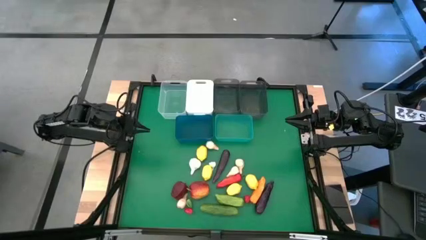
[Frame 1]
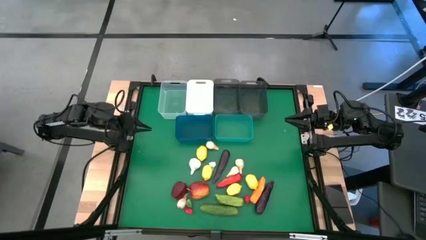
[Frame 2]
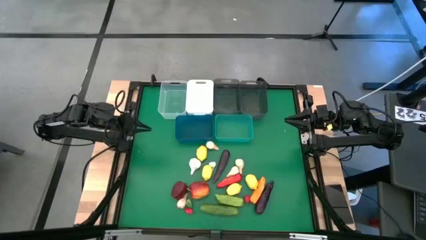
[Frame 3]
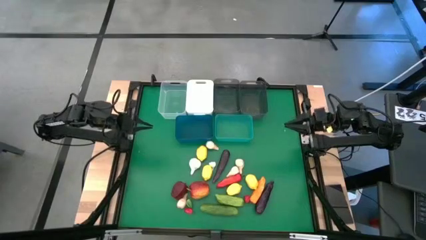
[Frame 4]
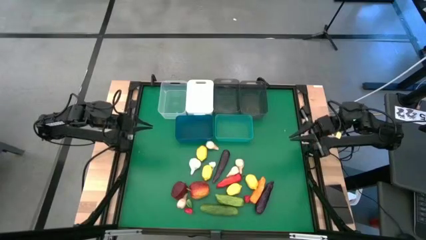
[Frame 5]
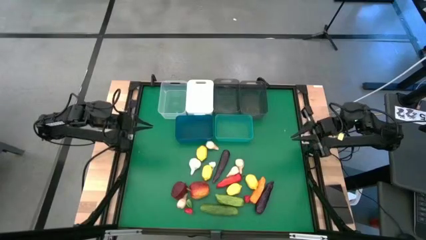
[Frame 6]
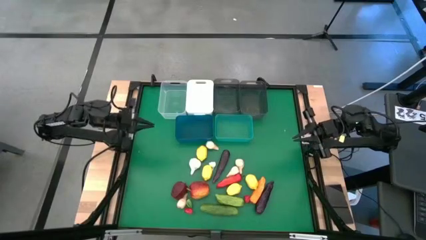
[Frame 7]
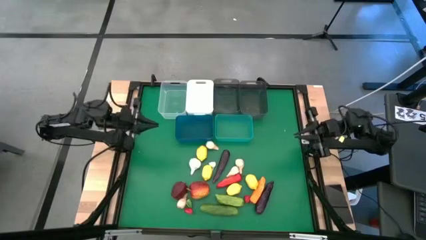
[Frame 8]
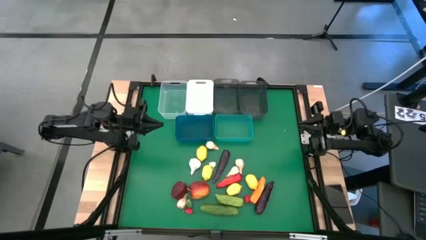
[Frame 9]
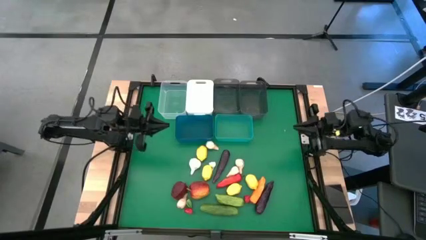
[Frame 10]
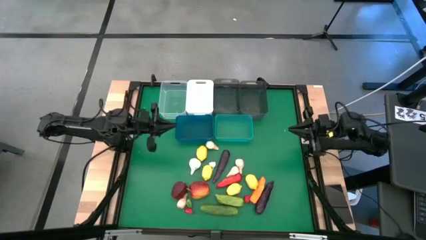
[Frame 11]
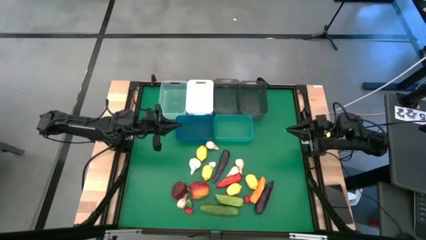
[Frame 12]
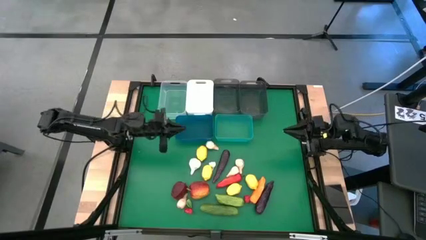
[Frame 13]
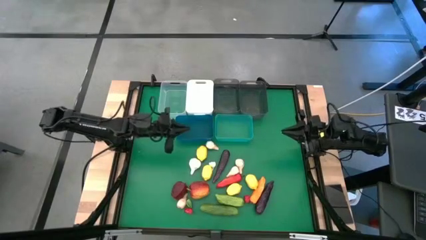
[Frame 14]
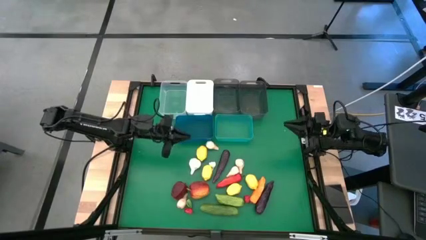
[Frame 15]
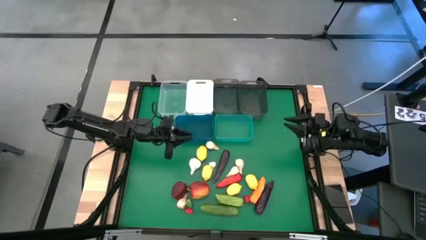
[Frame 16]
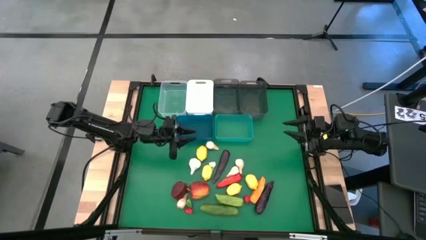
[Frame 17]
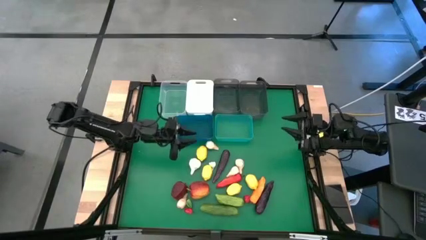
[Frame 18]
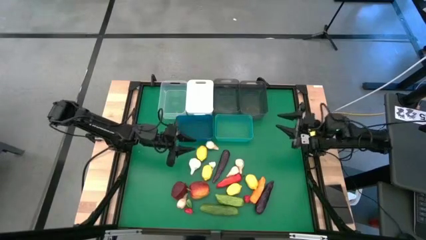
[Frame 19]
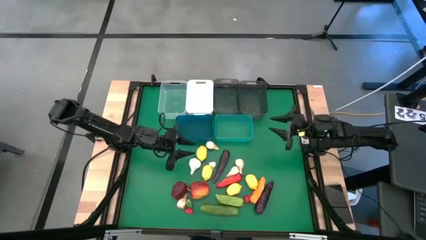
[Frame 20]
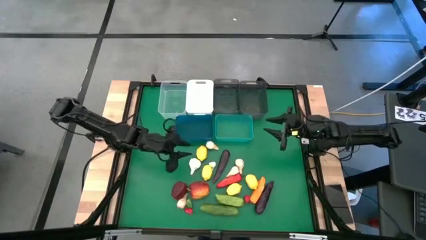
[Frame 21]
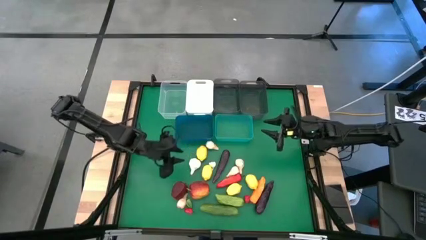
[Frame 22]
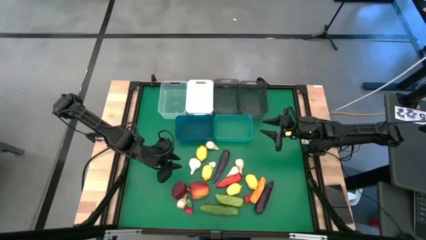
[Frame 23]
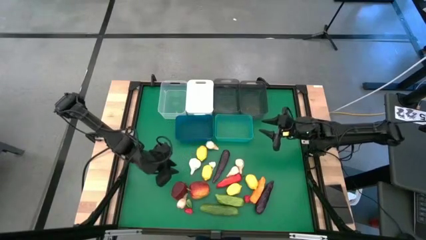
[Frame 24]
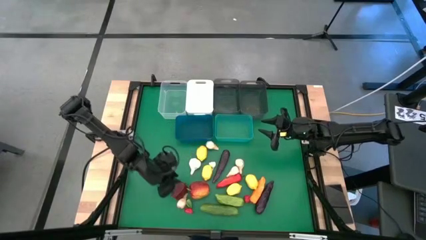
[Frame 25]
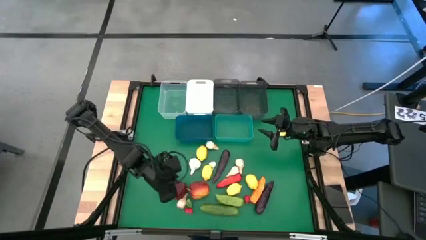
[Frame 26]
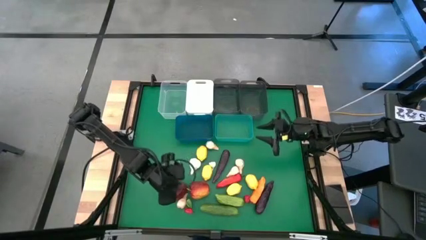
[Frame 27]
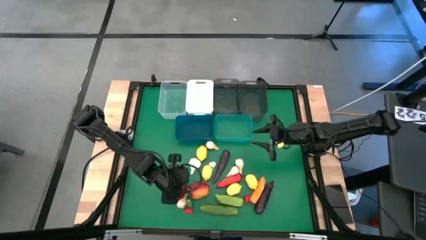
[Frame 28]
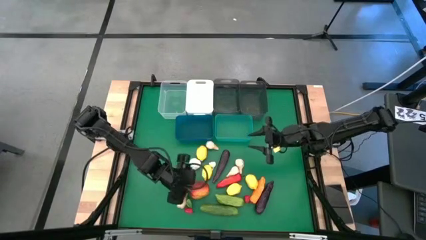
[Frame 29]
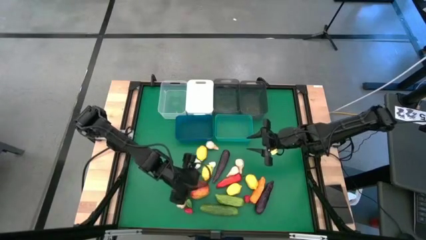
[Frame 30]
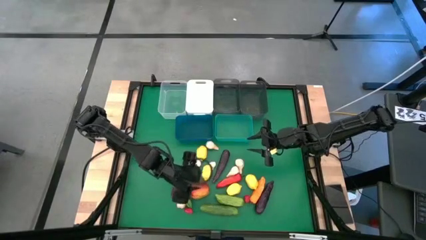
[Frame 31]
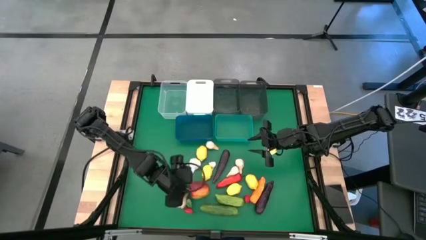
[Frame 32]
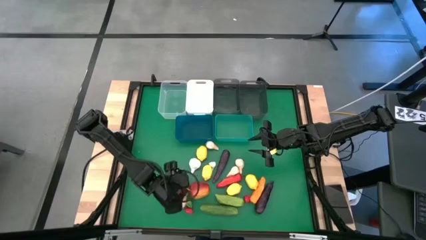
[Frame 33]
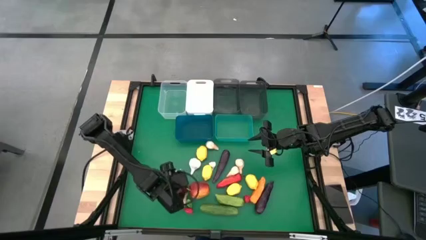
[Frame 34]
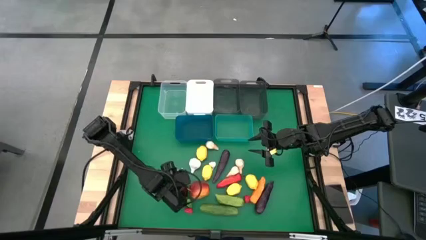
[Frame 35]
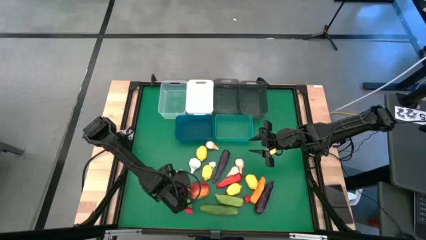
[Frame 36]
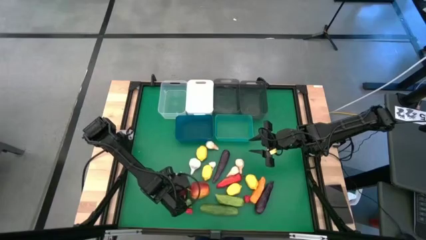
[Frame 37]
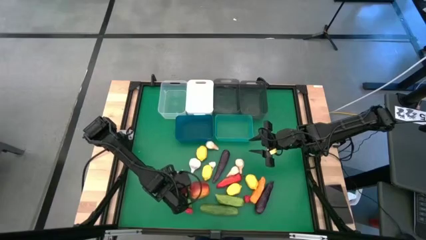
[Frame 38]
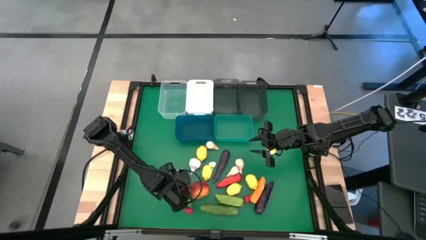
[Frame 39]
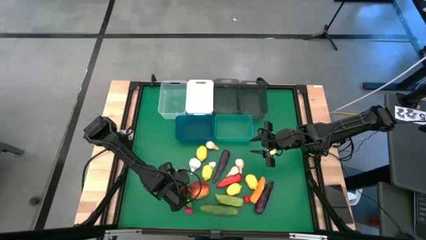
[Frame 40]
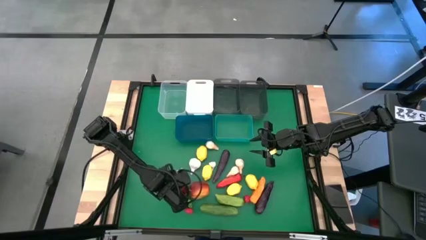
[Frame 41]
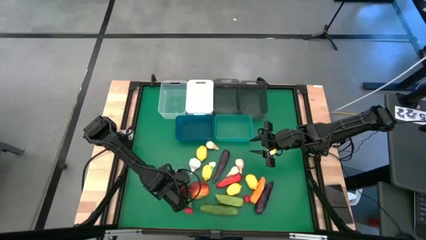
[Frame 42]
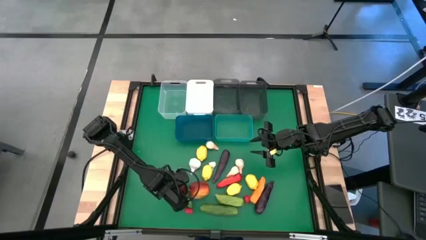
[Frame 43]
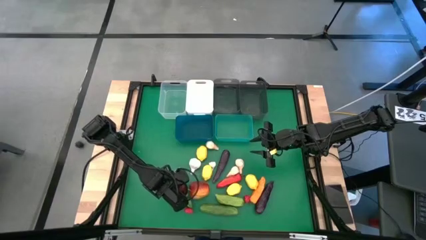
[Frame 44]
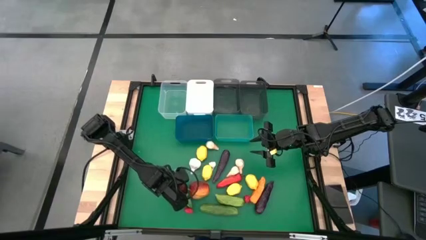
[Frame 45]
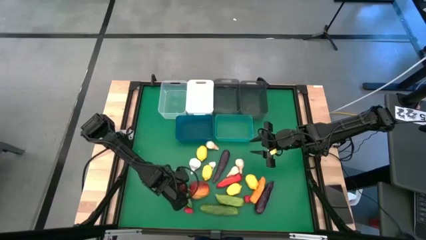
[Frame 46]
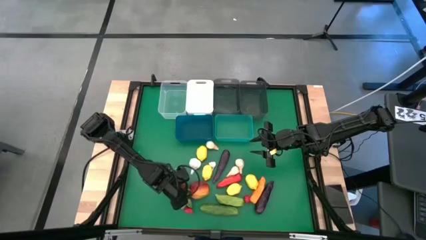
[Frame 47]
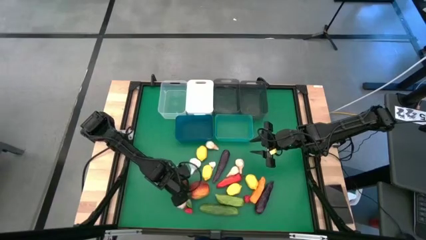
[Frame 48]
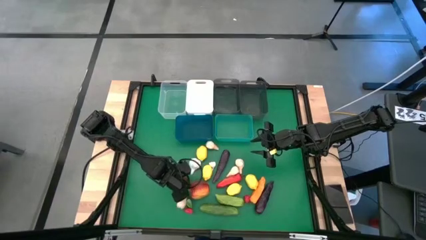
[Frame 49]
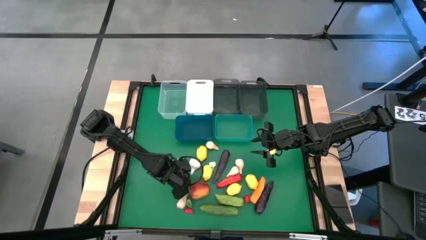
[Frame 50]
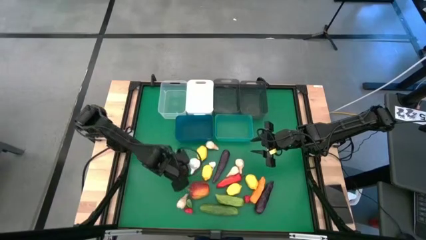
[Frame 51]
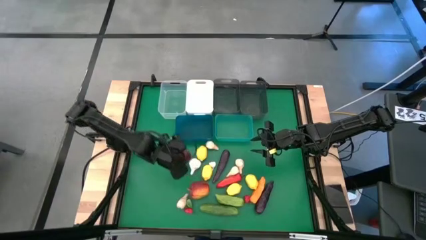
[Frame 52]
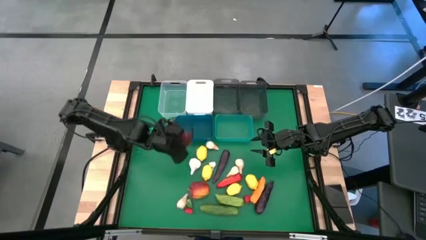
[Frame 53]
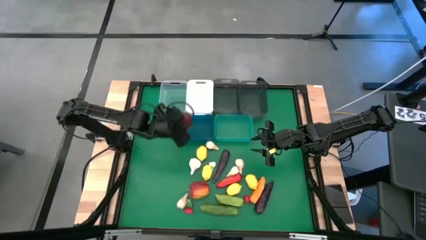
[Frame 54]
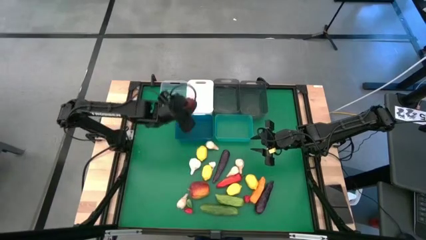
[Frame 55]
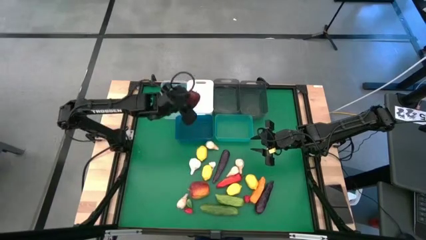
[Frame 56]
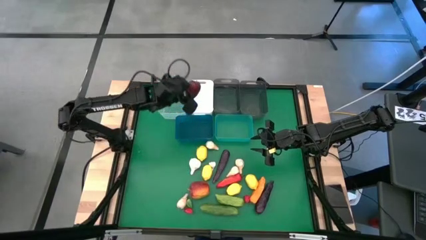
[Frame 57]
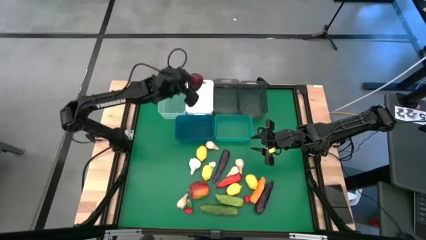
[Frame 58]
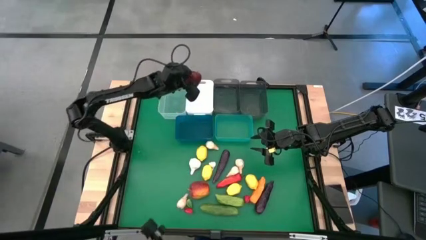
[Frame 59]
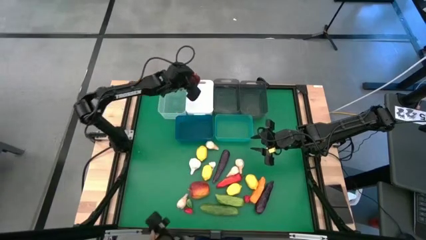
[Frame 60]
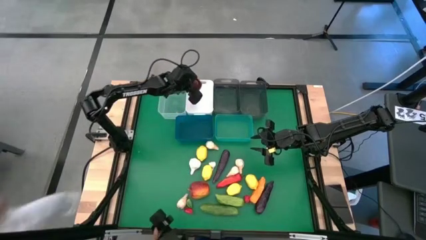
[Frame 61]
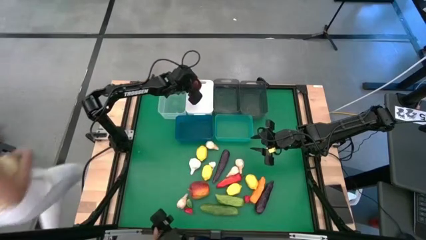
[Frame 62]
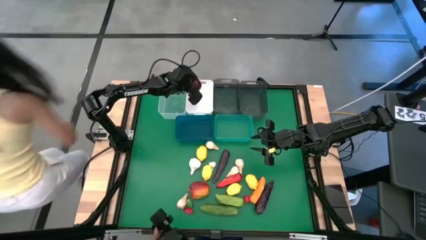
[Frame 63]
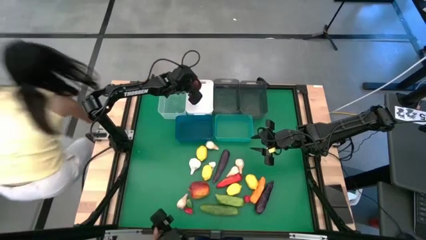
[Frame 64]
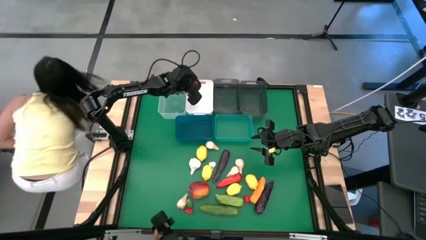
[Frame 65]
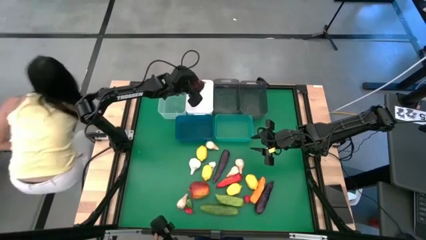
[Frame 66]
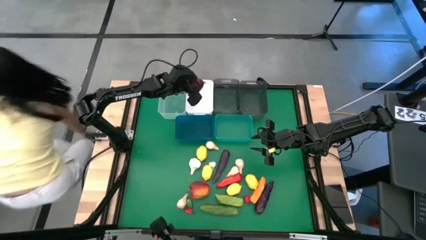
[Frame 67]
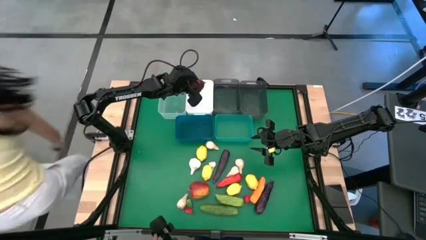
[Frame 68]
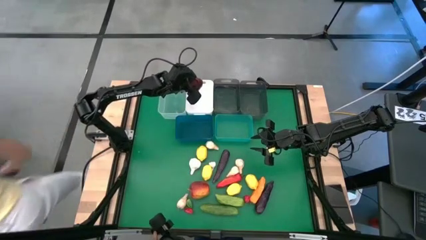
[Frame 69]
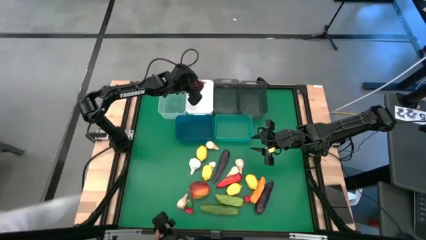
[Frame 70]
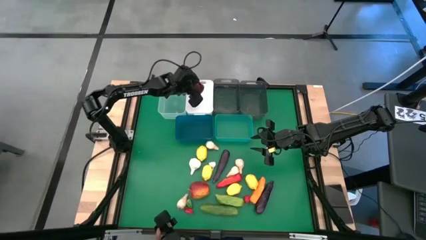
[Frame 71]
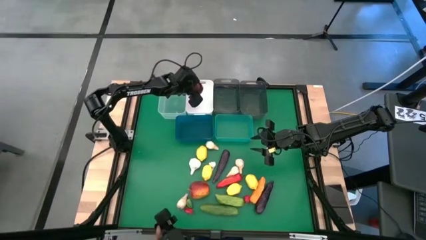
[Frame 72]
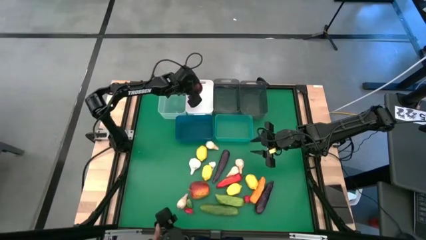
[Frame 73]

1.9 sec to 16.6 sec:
Task: Sort produce into baskets
Put the apple into the white bin
